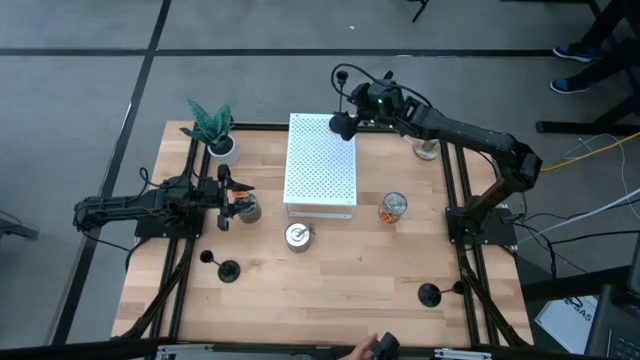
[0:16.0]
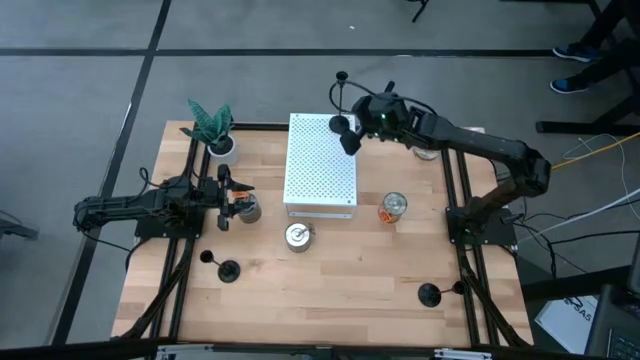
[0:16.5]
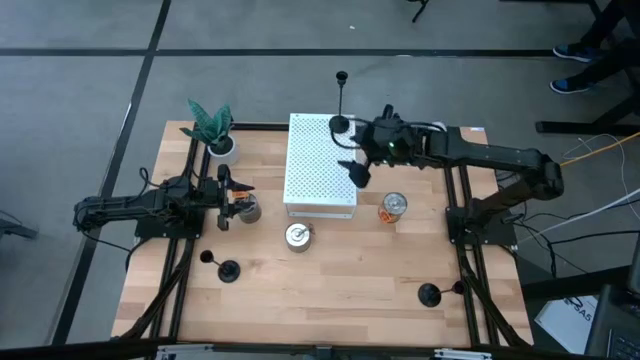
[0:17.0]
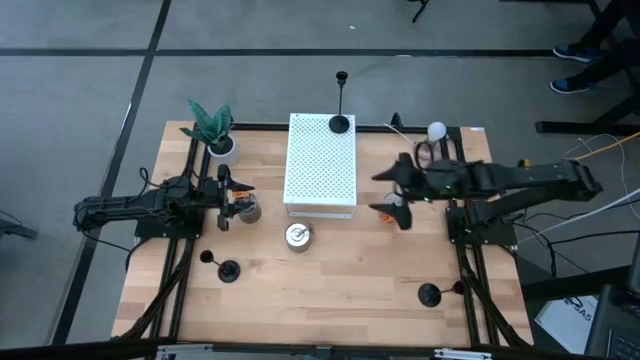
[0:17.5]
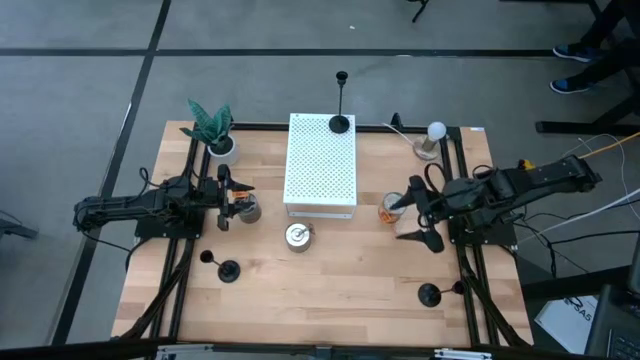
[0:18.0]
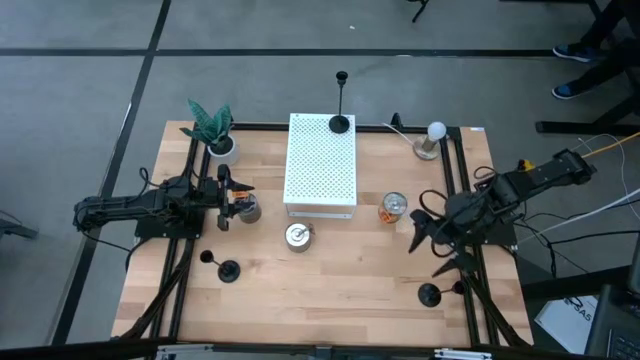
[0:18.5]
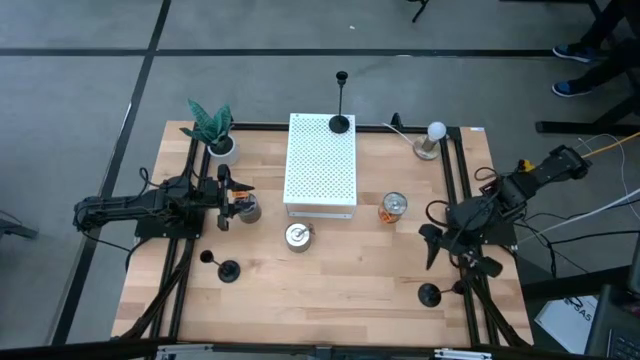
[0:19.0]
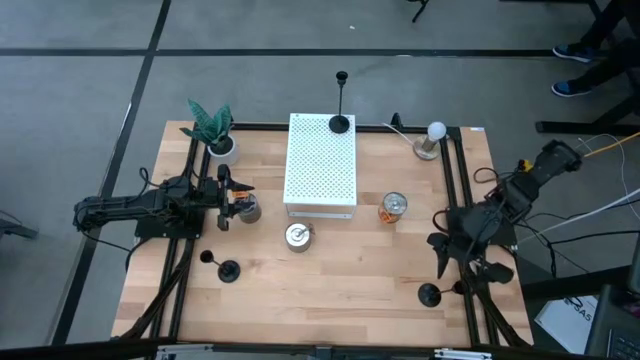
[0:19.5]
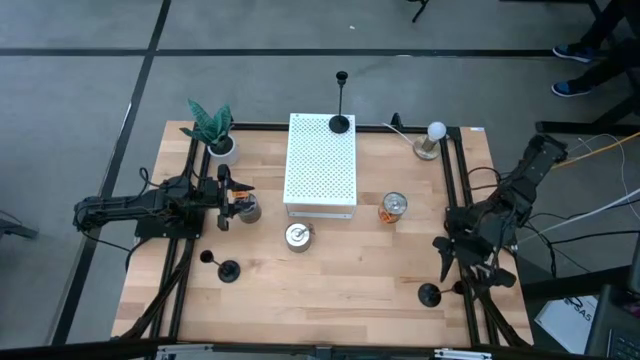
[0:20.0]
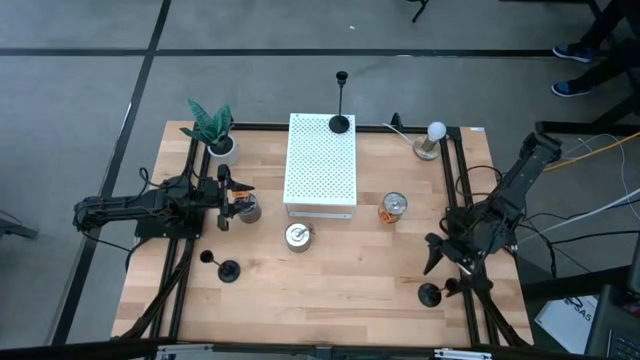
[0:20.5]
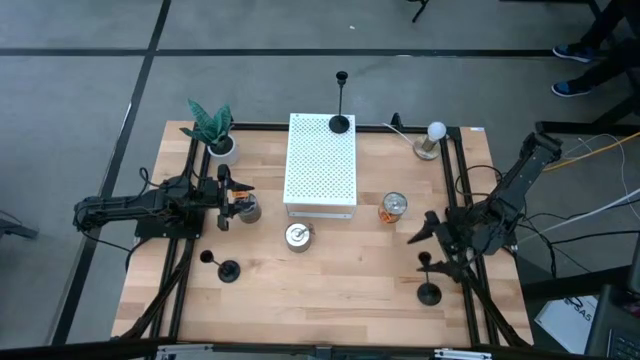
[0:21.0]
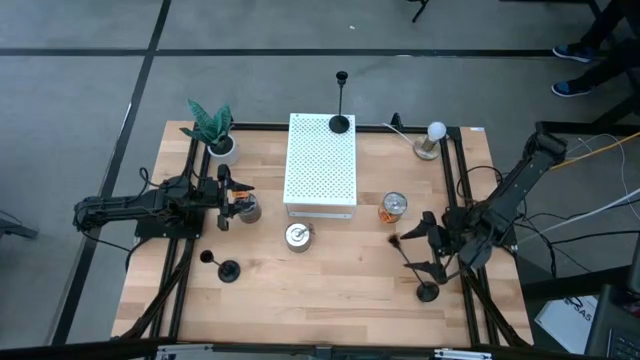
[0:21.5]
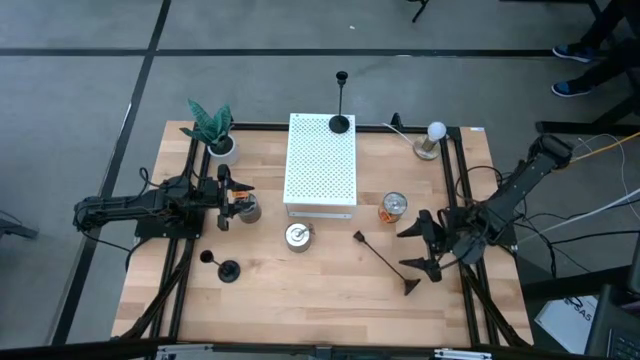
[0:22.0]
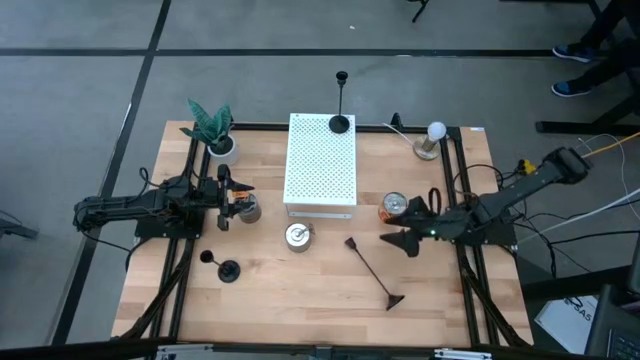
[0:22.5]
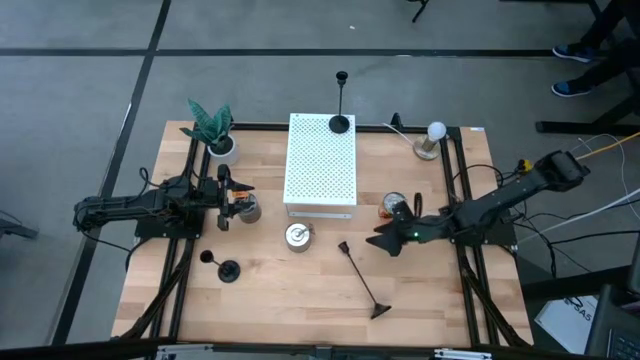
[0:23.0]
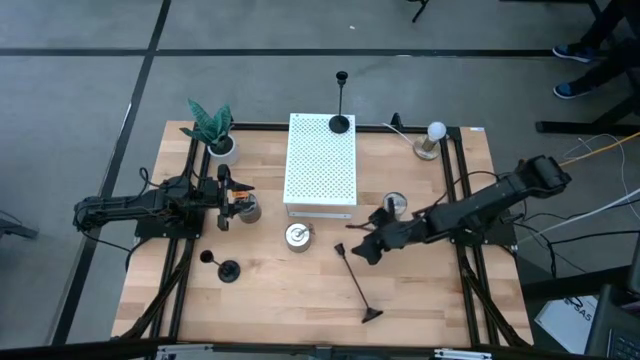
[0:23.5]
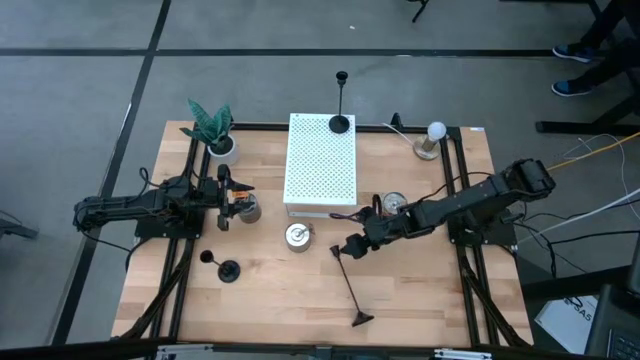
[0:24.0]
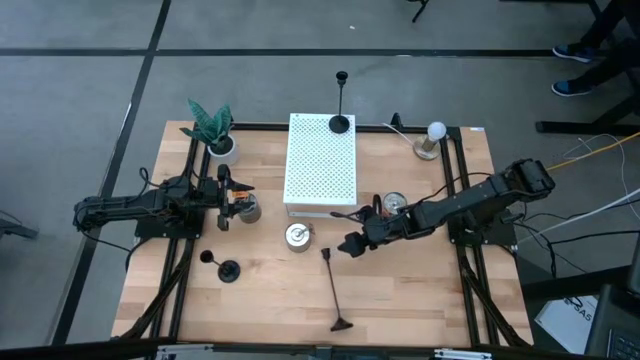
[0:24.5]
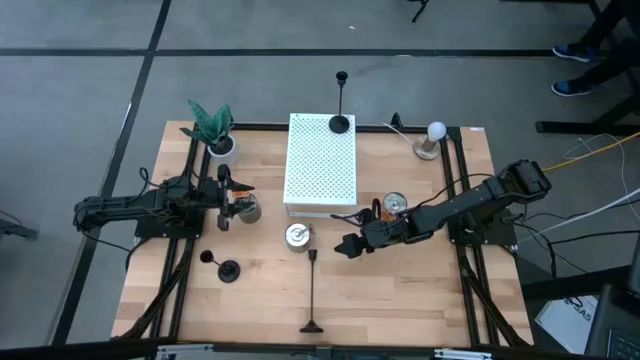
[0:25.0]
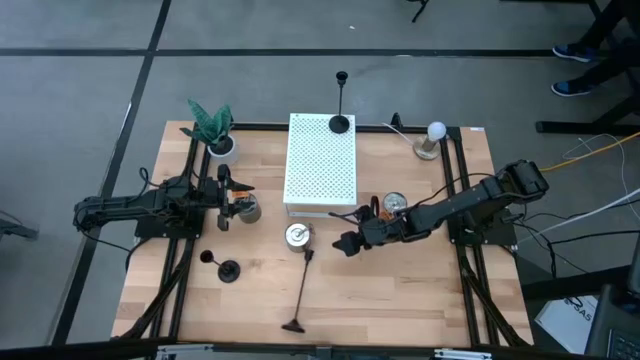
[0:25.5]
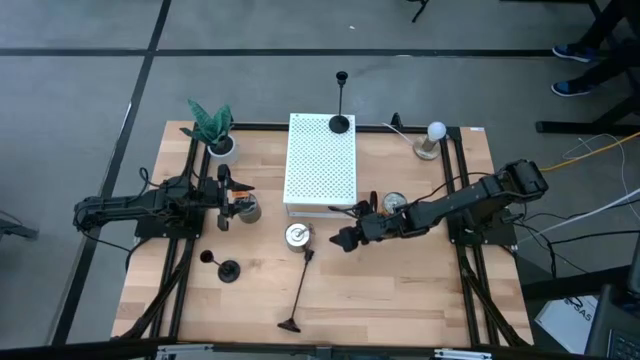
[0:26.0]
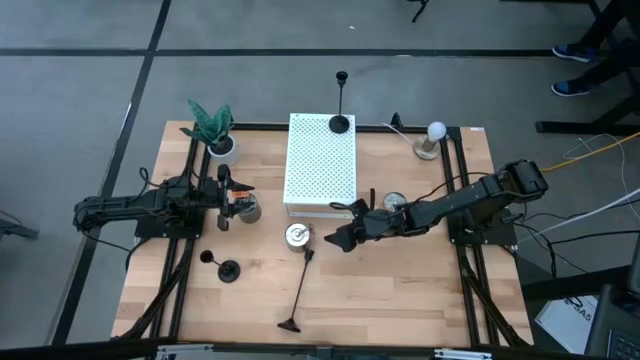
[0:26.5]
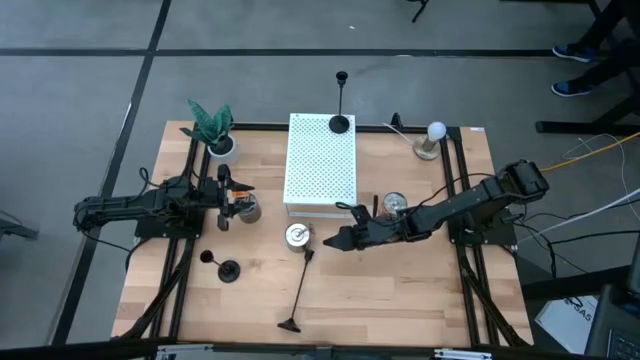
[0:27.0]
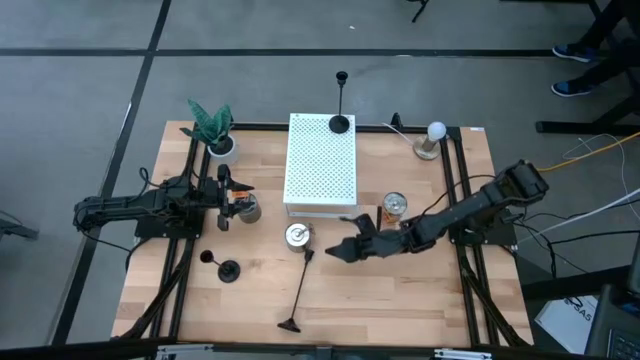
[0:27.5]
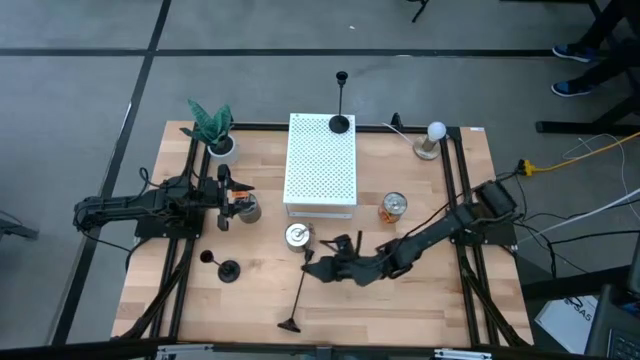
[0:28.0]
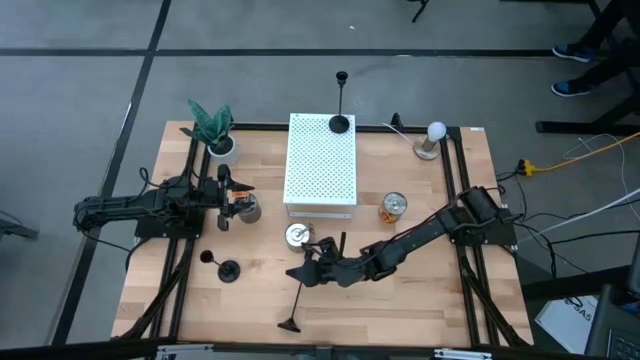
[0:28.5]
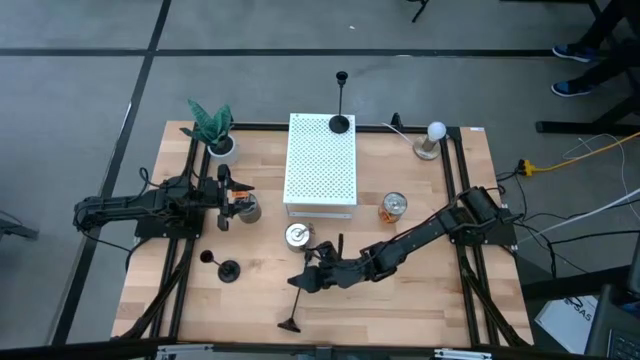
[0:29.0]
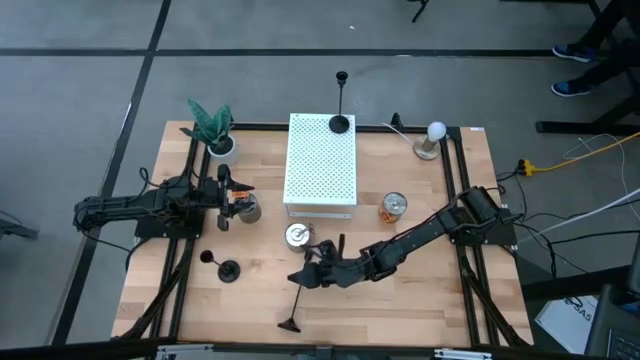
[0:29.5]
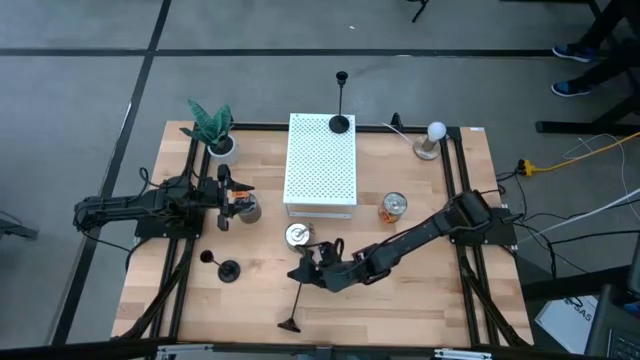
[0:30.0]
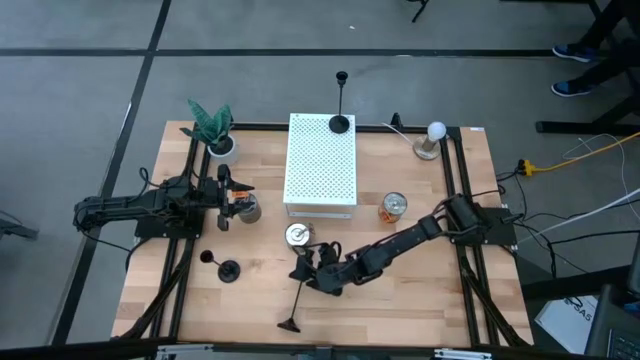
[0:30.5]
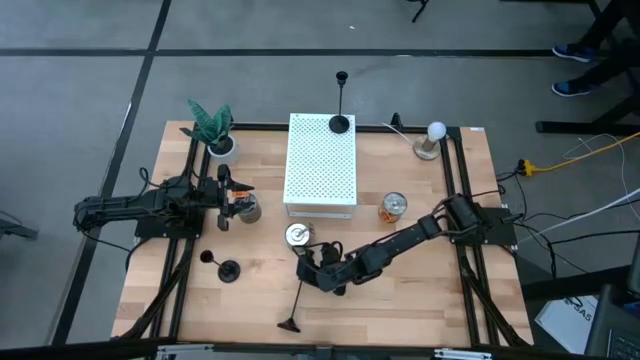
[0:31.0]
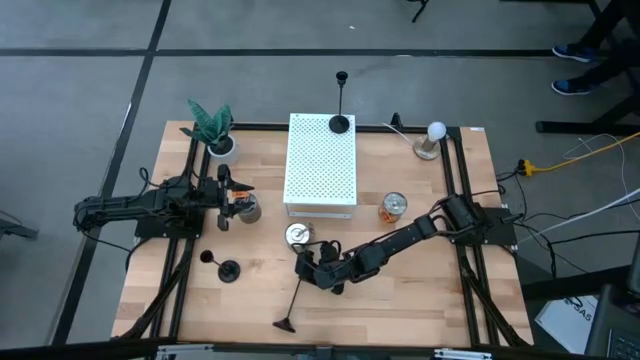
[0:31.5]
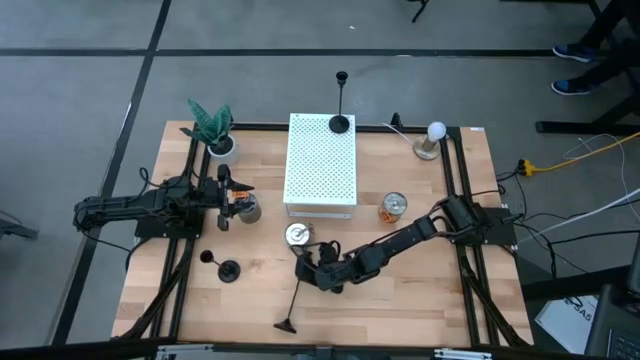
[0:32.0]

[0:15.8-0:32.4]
Task: Pick & Place candle stick holders
Put the bottom black candle holder on the shelf

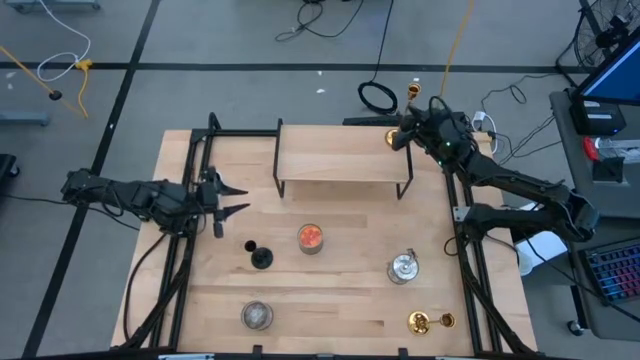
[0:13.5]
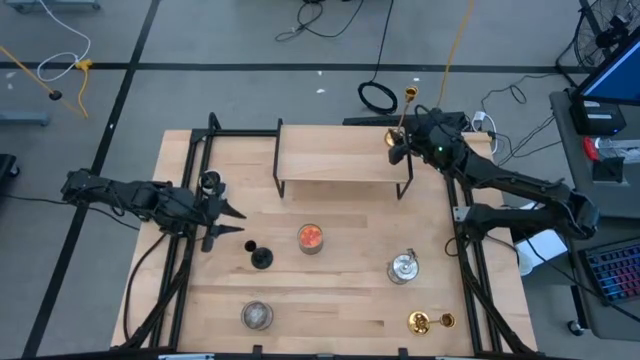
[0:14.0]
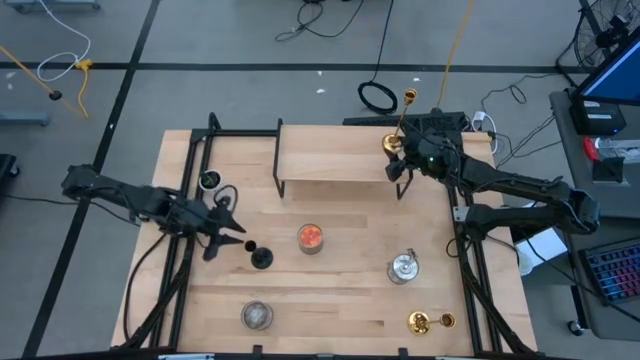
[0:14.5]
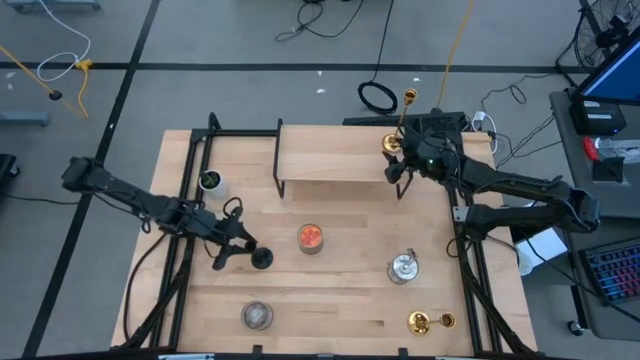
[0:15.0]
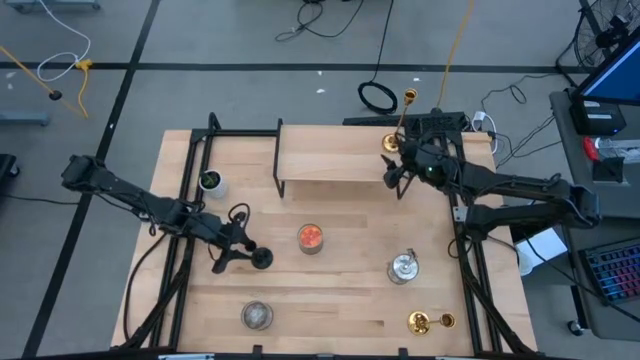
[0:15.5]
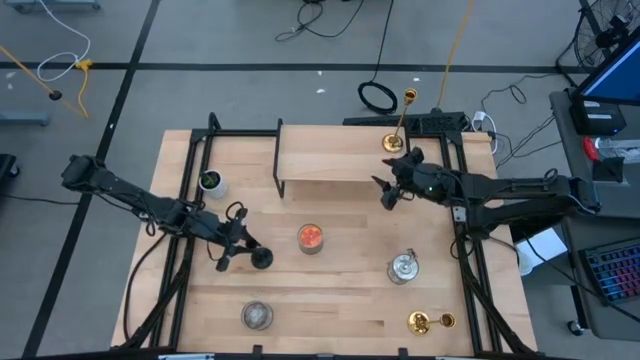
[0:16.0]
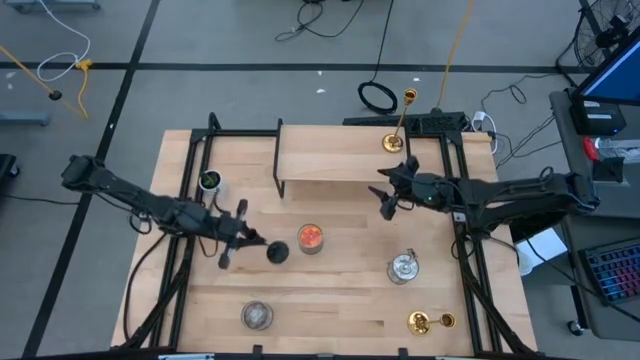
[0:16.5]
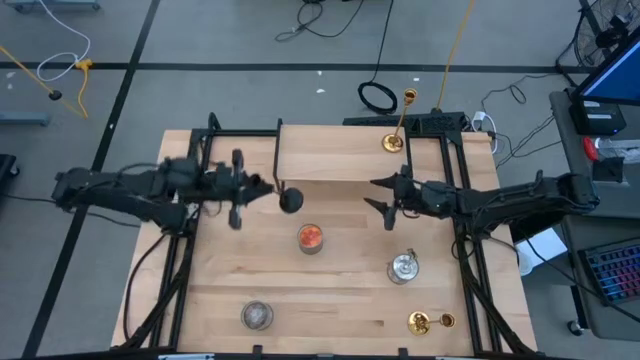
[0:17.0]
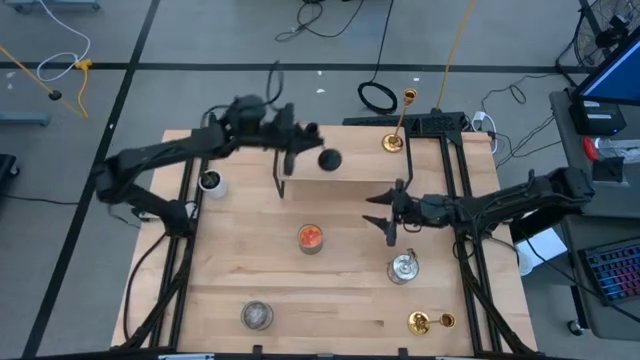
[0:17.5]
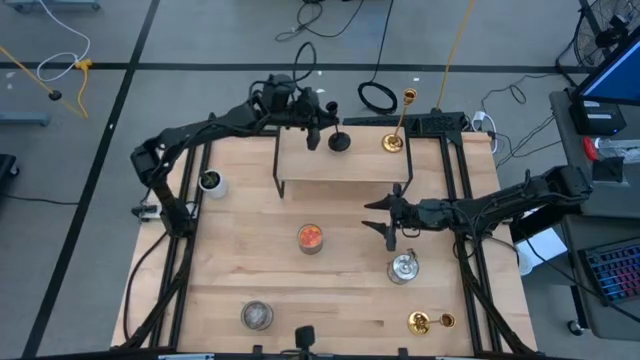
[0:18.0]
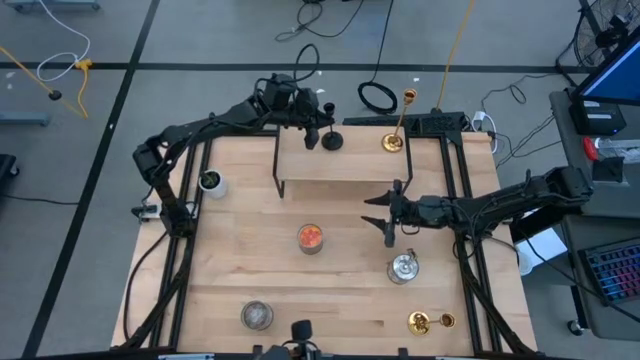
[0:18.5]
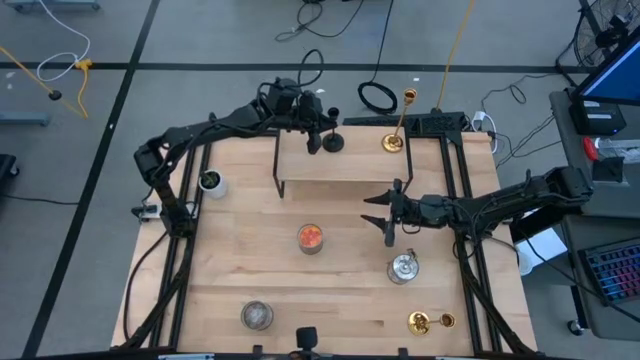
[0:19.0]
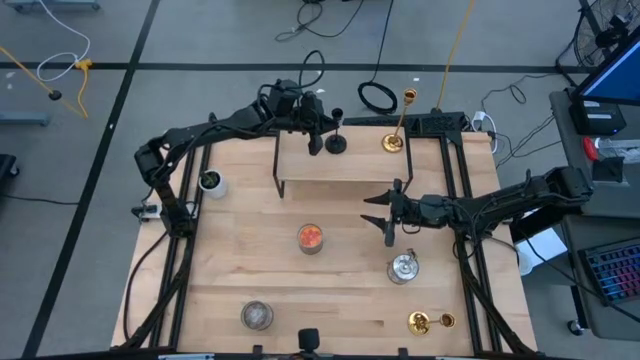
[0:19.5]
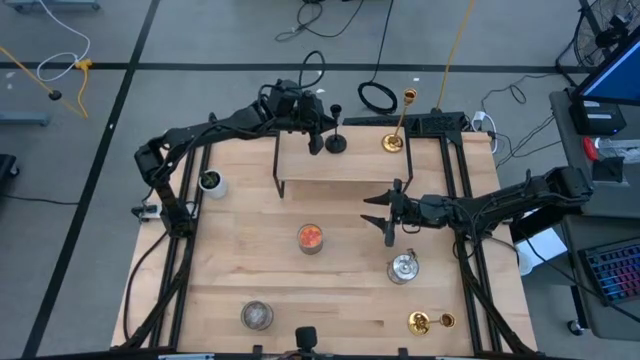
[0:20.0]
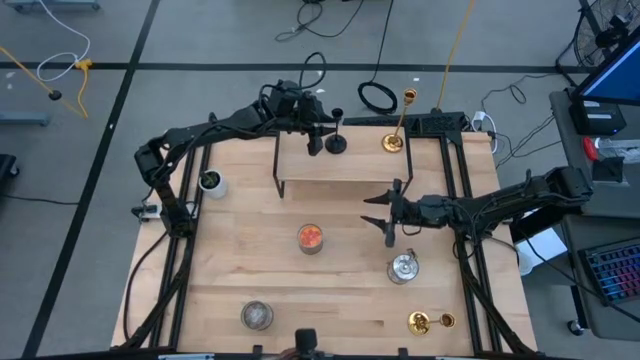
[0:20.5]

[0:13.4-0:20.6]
Task: Pick & Place candle stick holders
Put the black candle holder on the shelf
